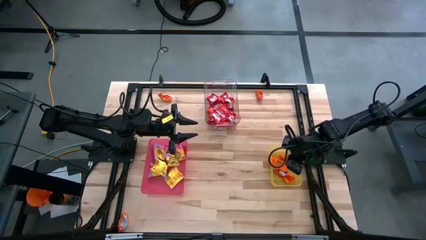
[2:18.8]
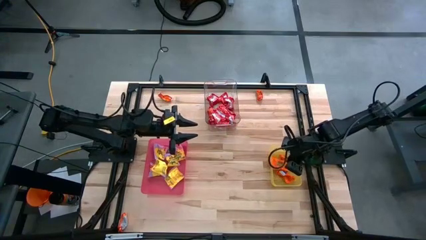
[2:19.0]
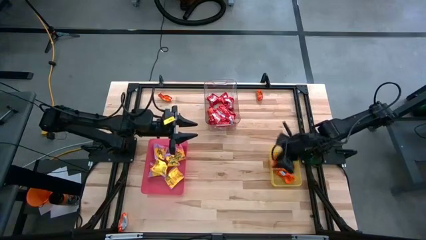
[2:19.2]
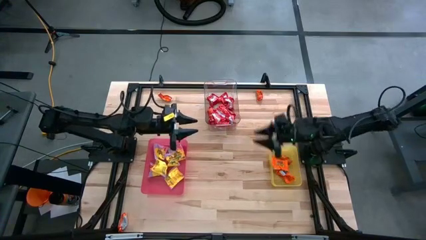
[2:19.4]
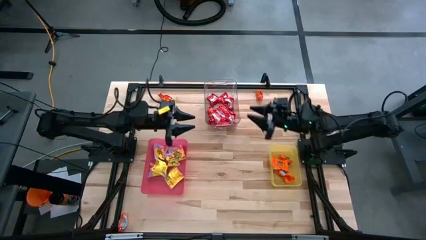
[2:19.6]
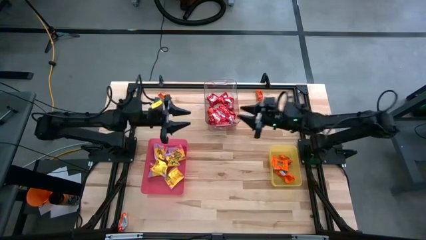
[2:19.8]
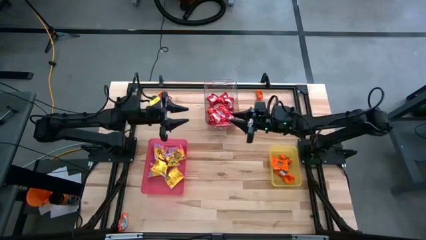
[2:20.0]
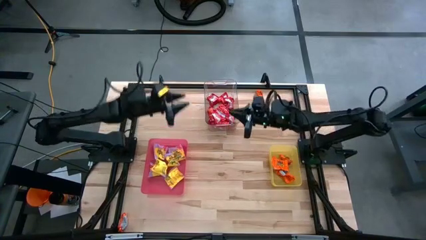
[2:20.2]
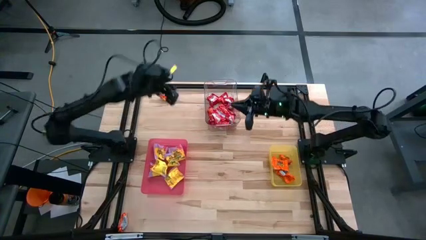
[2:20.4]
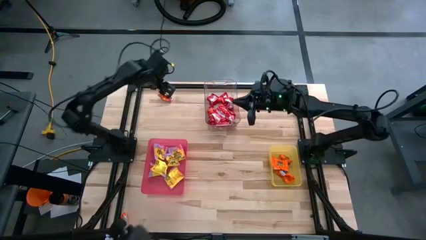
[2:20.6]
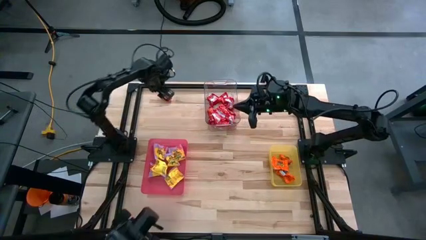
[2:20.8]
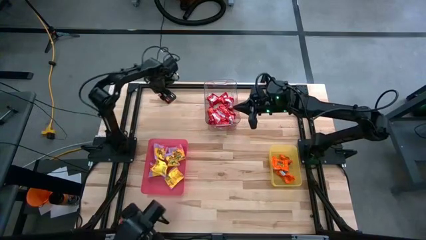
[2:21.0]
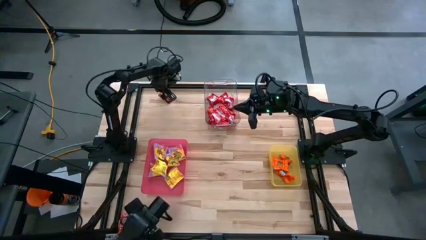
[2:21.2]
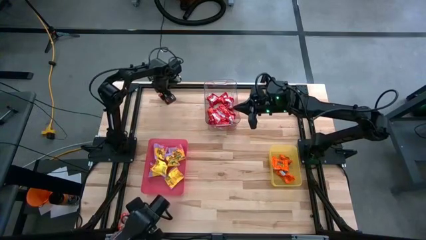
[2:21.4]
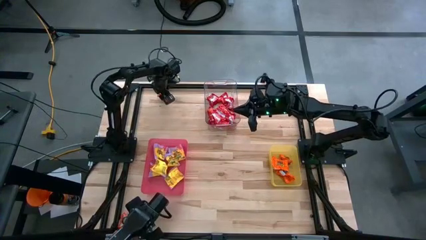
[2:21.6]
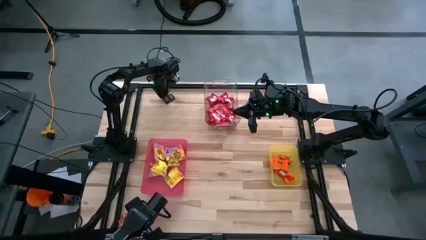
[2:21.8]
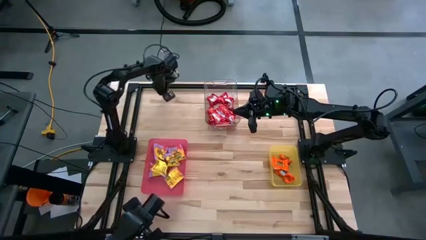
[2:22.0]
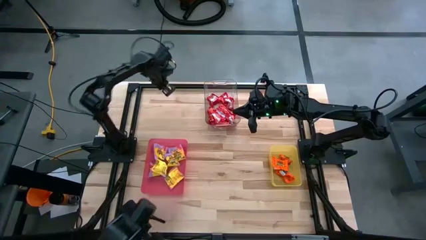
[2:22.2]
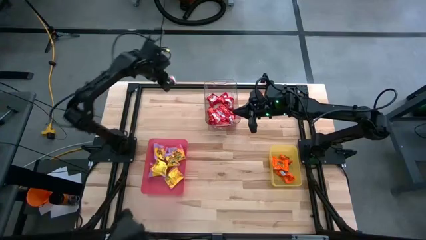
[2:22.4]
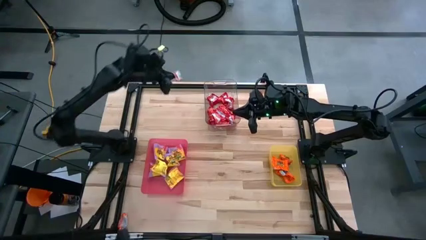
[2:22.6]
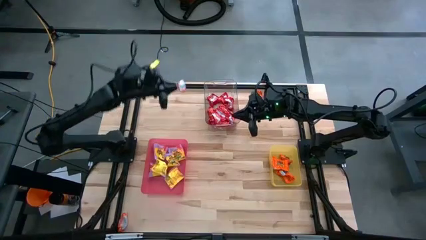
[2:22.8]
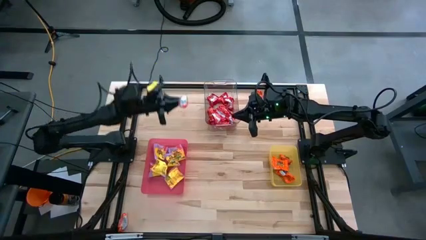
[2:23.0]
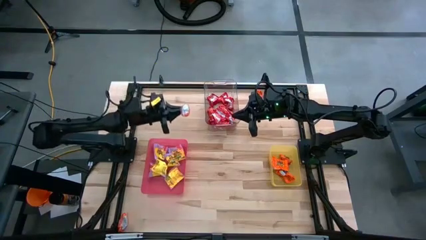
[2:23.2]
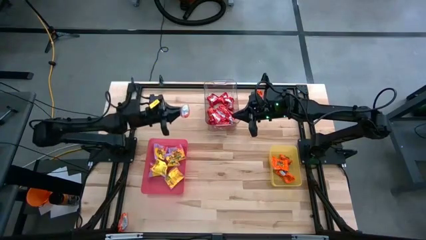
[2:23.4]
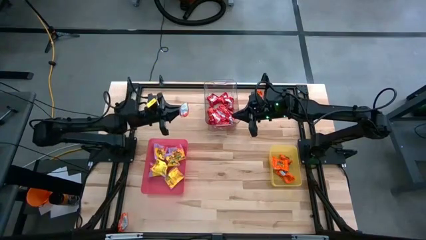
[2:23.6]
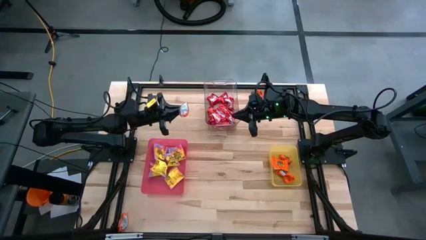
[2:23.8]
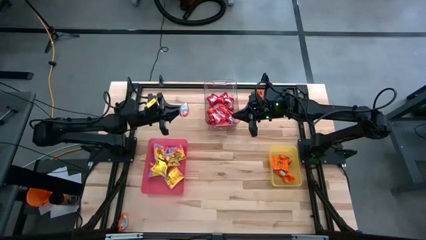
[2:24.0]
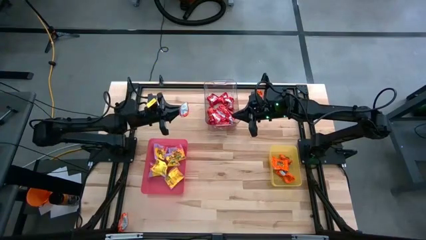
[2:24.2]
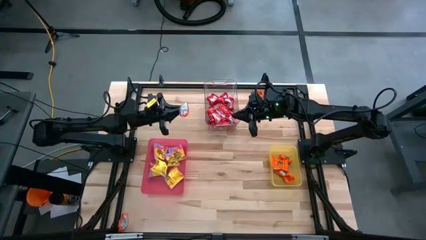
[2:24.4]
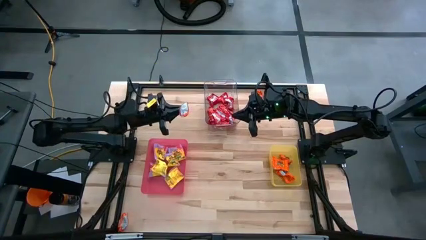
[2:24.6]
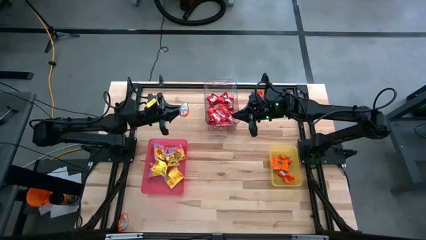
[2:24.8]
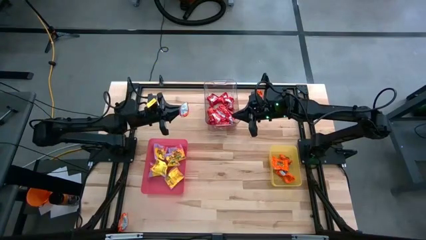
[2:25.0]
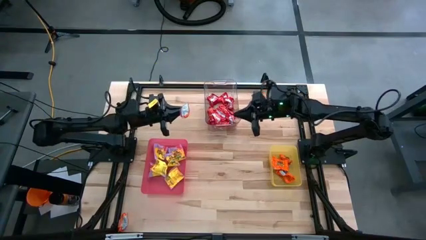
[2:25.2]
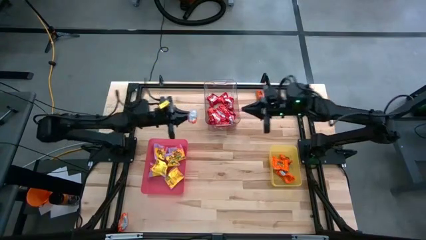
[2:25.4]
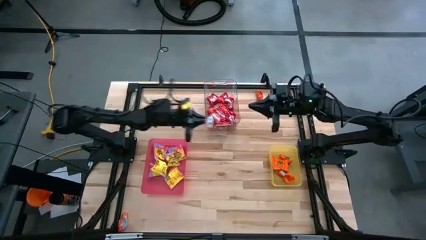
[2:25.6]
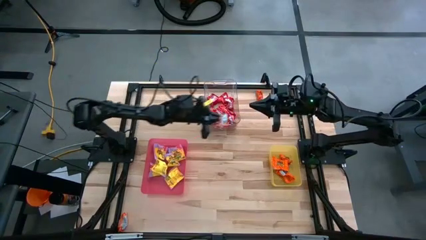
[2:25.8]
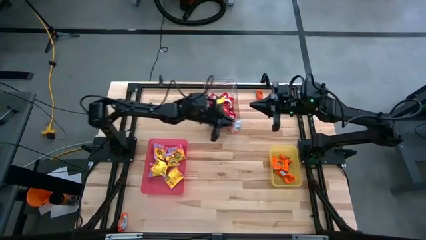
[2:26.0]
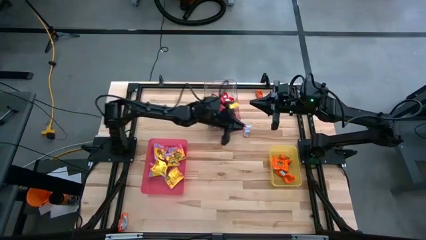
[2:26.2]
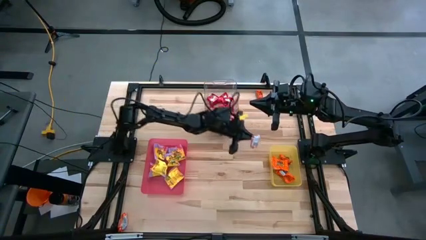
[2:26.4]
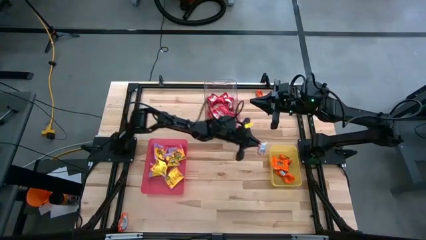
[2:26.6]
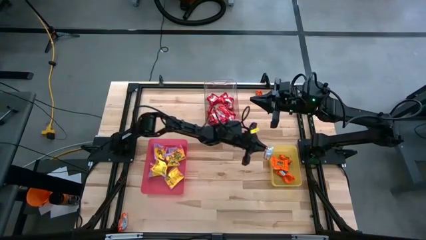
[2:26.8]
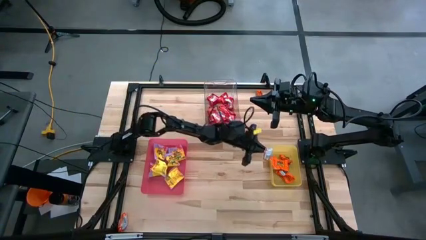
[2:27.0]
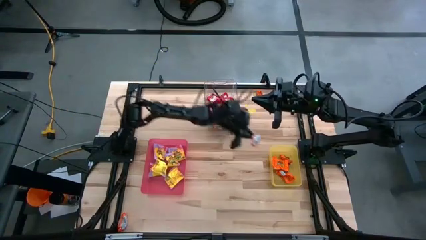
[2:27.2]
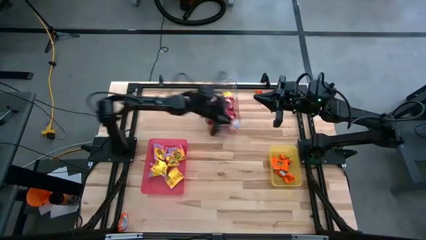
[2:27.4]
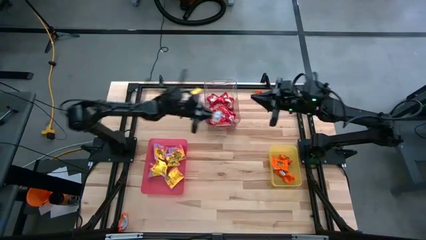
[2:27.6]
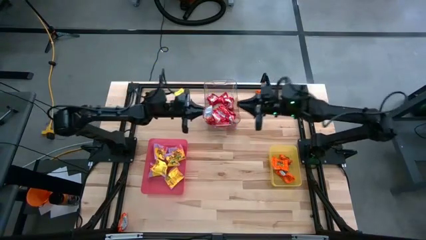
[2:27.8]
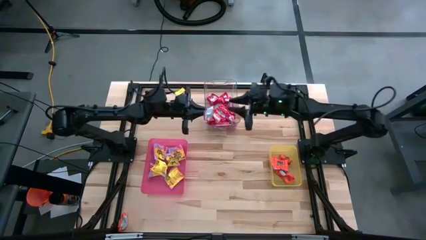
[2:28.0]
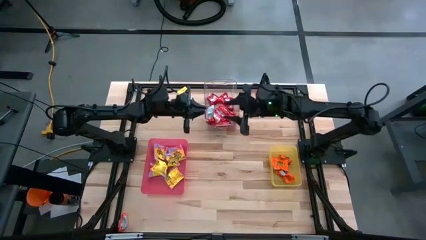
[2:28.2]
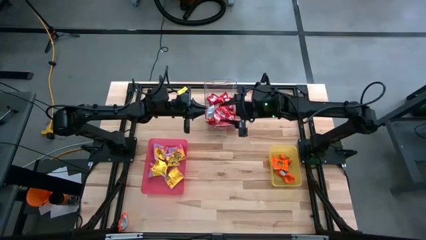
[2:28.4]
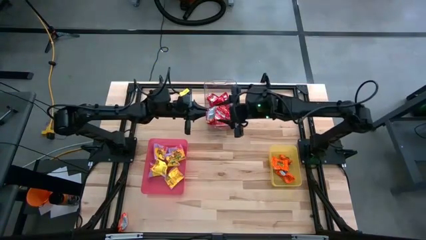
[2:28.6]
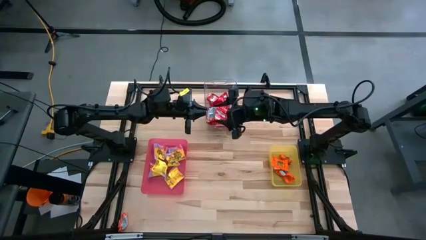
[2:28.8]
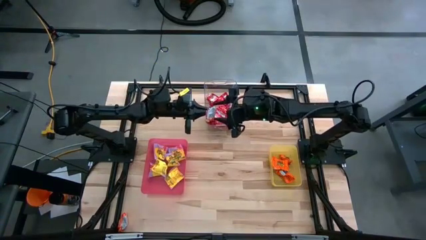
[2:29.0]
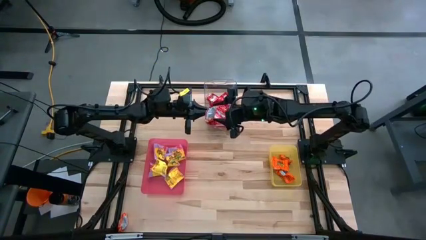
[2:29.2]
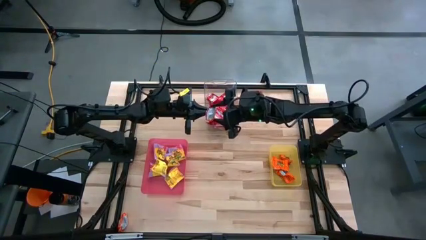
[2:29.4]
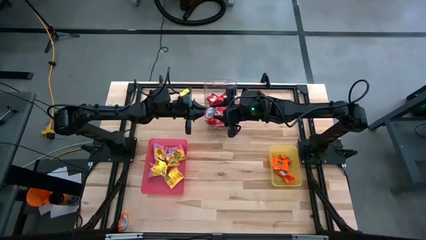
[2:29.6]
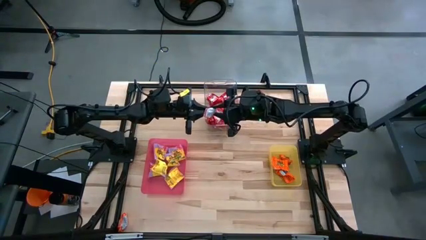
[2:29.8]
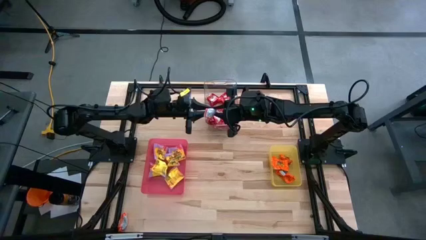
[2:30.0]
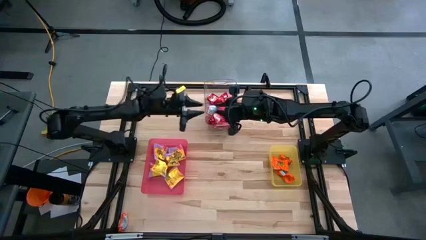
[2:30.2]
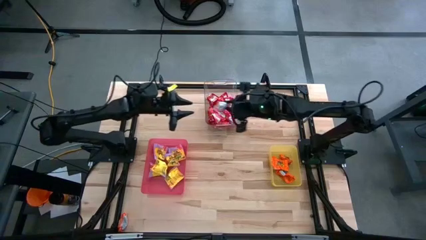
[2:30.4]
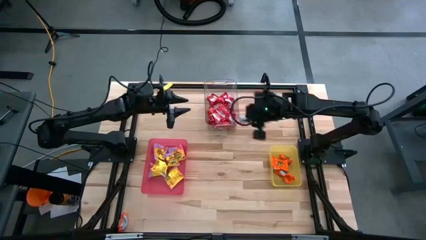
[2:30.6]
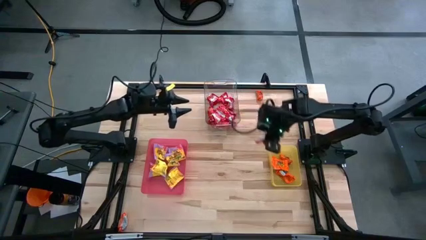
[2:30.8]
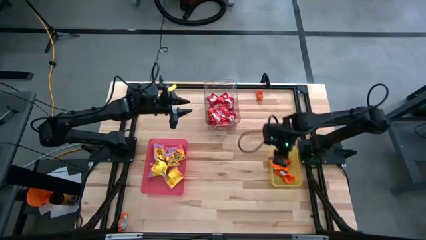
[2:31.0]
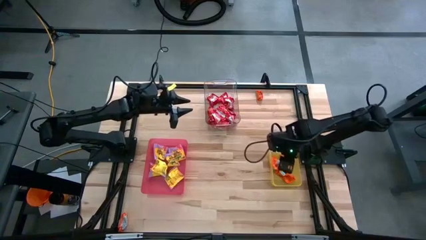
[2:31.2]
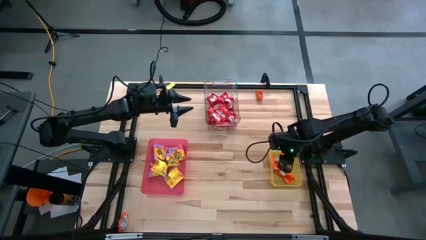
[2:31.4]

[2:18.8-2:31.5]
Task: Sort candy
Put the orange candy into the yellow bin

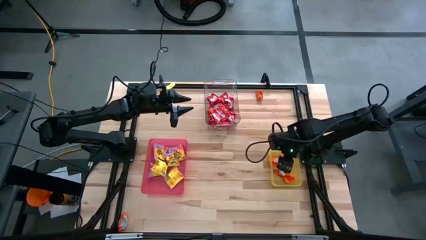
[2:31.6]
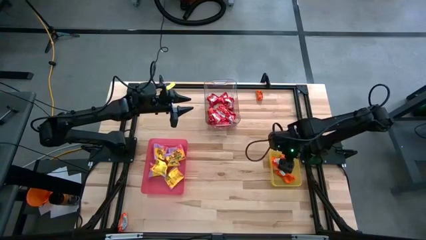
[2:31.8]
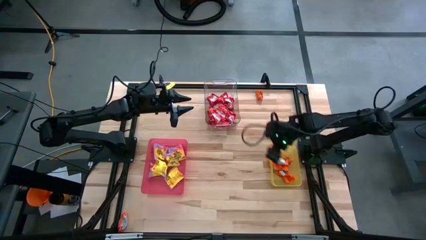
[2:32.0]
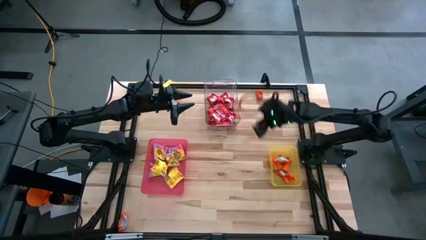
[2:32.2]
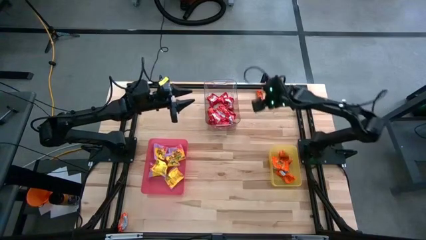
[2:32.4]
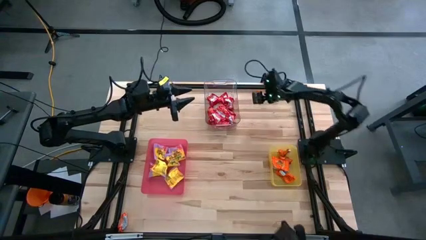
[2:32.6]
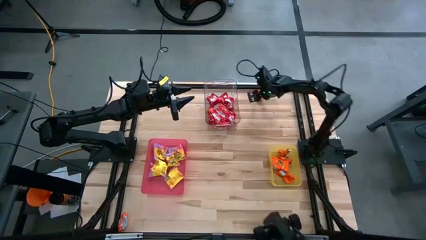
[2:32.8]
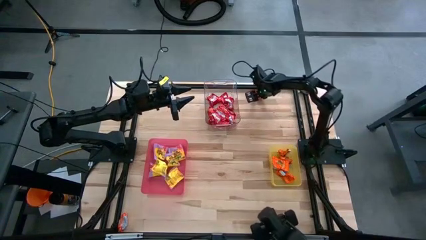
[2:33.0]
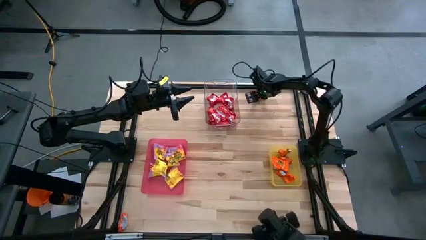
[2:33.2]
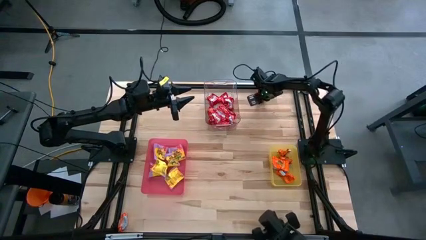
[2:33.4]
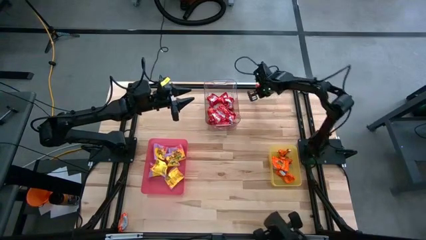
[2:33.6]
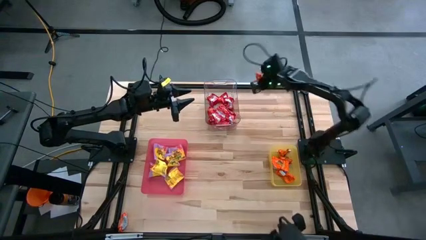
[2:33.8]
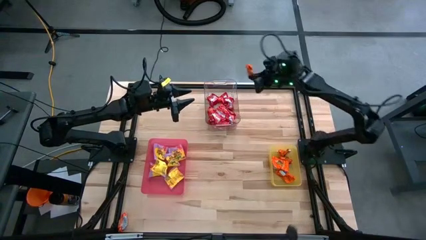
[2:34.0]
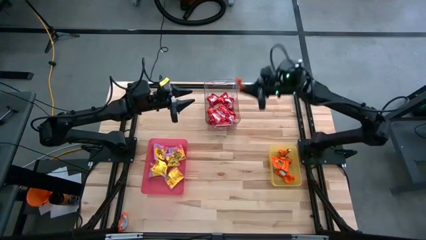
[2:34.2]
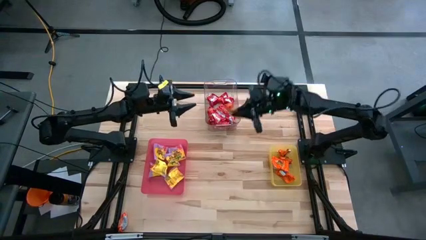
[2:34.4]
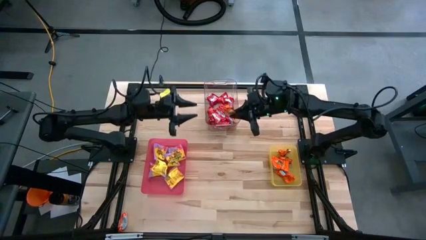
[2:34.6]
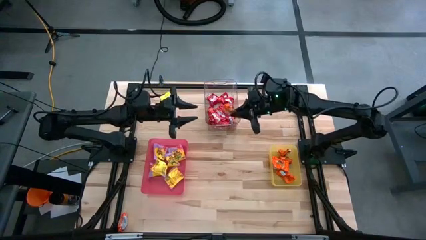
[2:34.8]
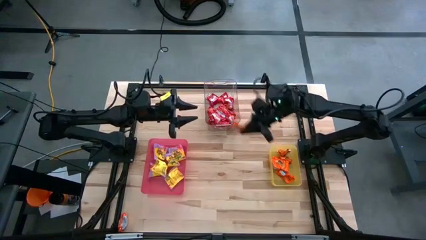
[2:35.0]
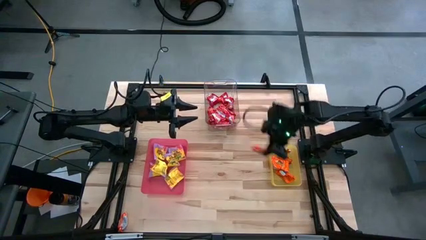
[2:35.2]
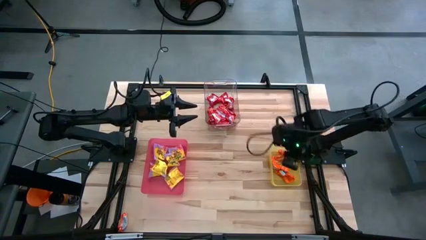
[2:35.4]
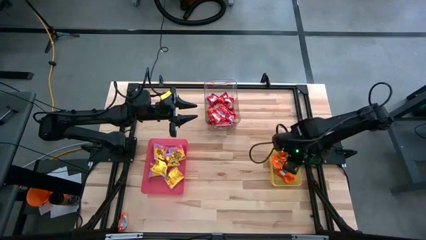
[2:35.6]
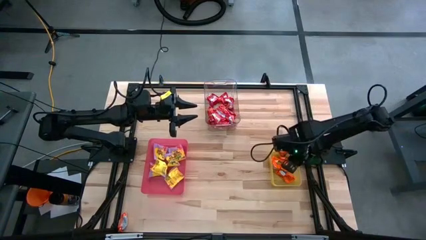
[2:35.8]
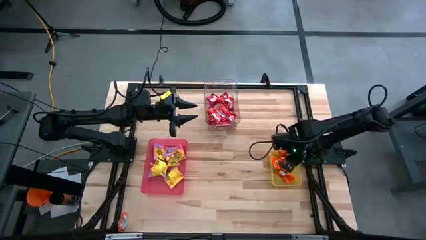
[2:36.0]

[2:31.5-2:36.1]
Put the top orange candy into the yellow bin
